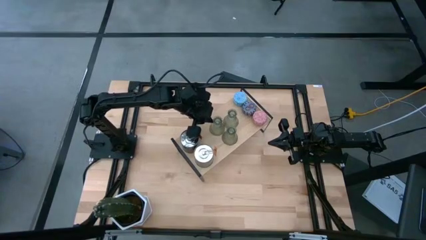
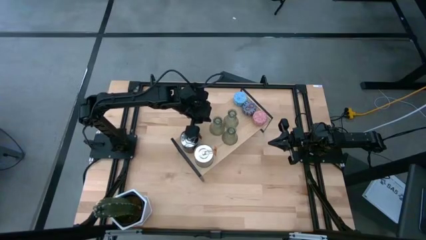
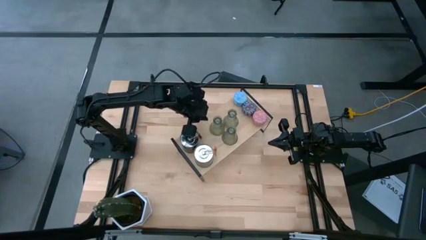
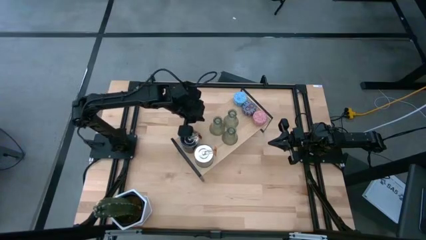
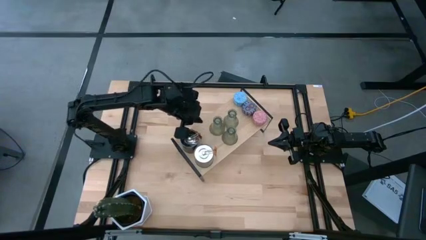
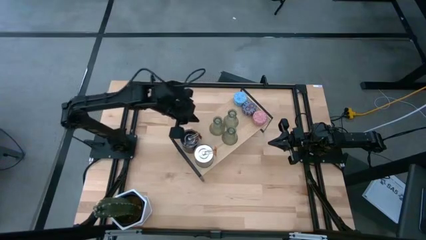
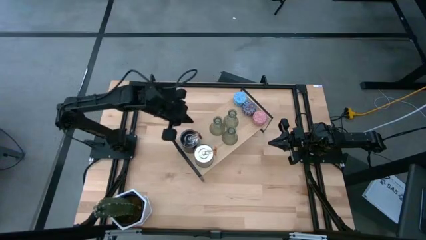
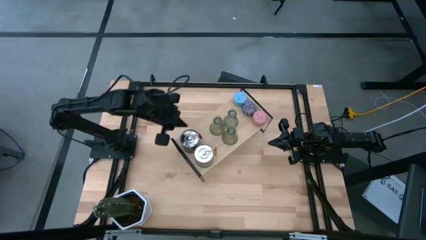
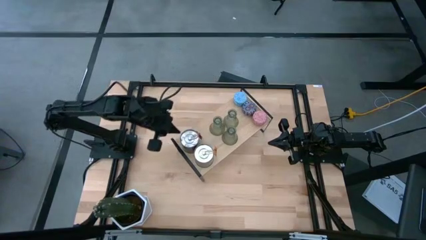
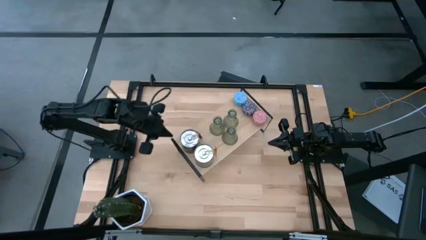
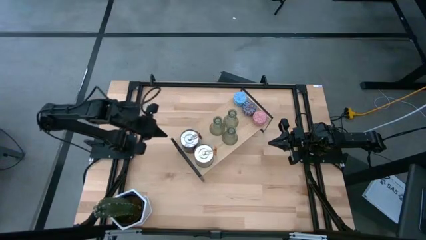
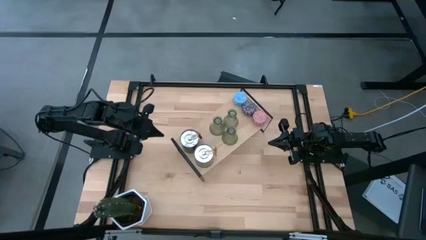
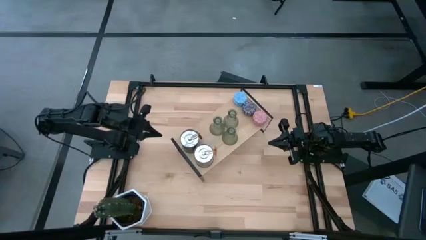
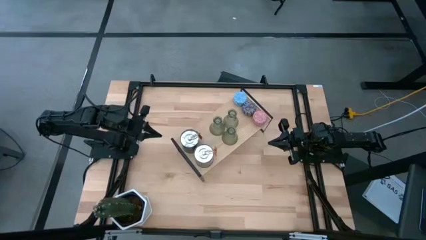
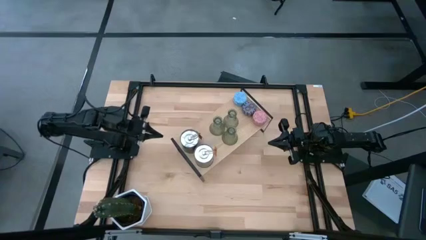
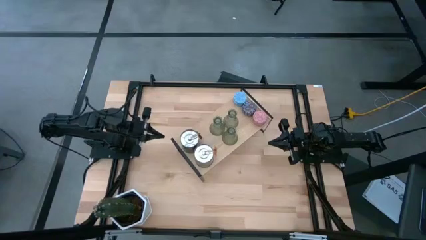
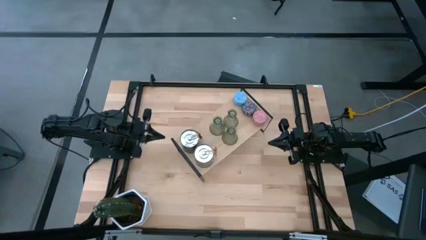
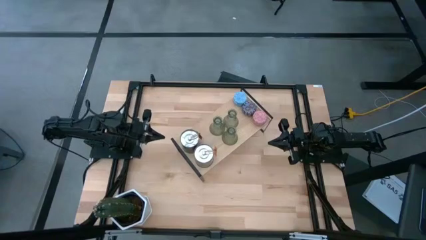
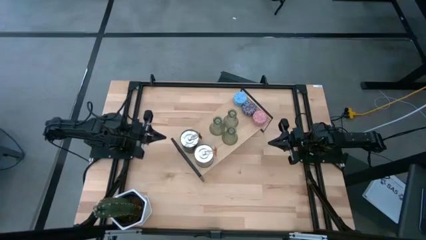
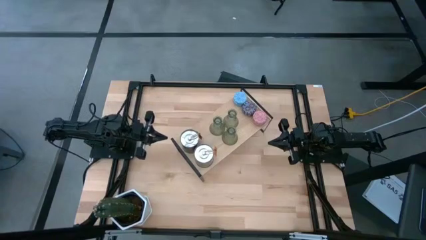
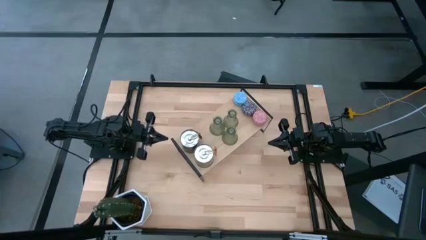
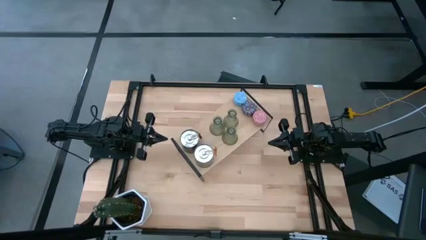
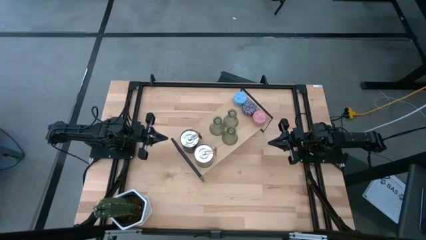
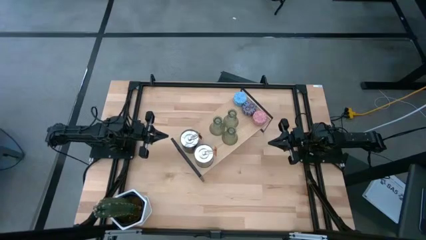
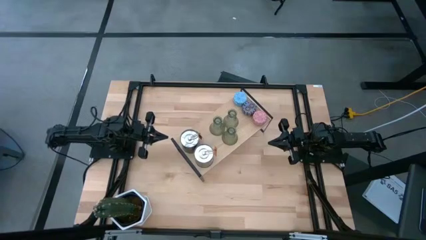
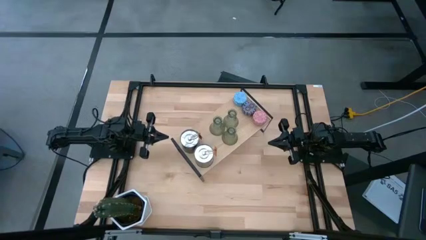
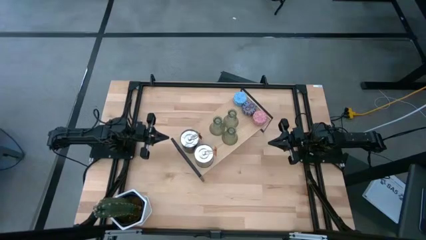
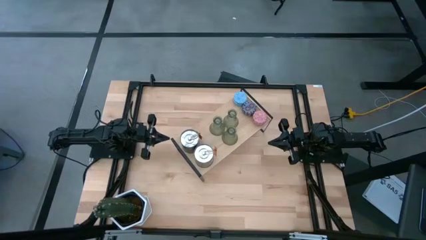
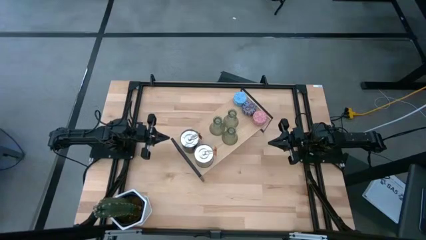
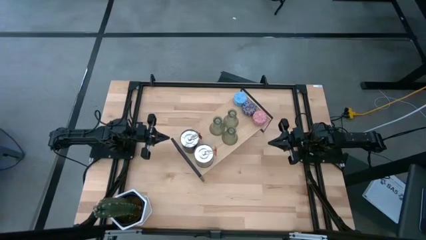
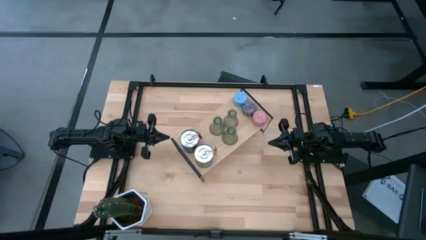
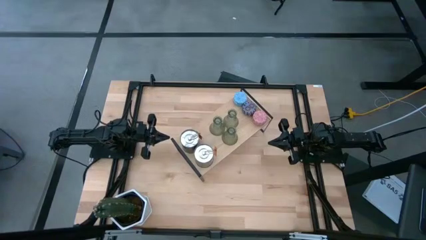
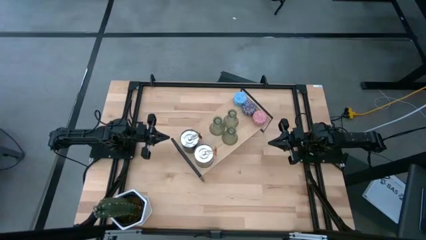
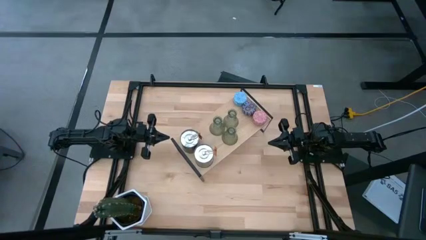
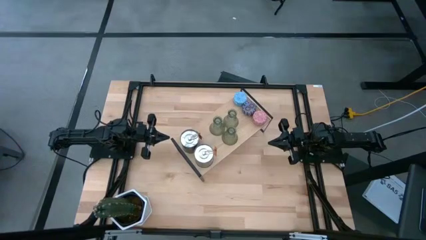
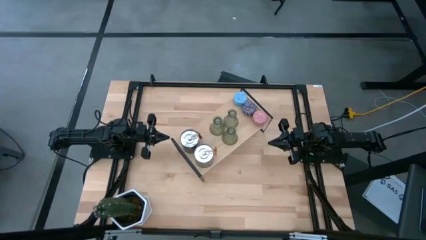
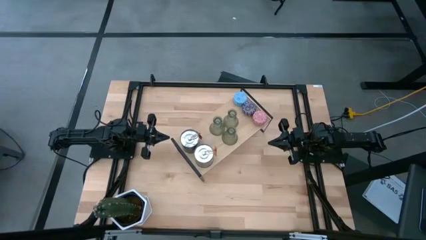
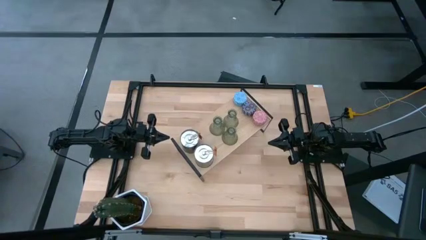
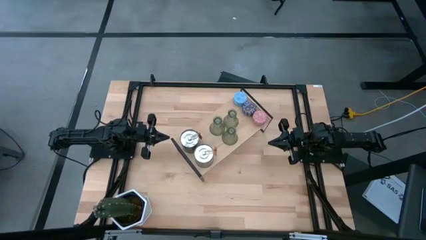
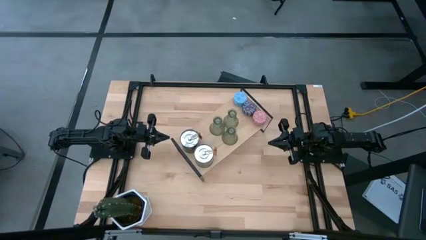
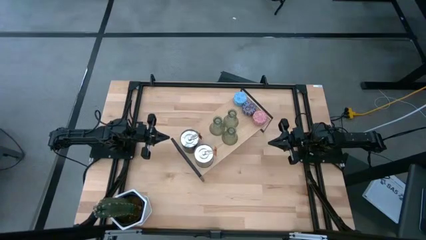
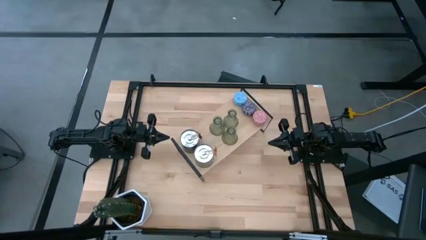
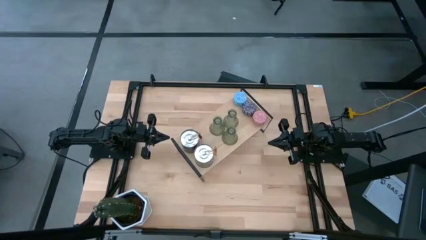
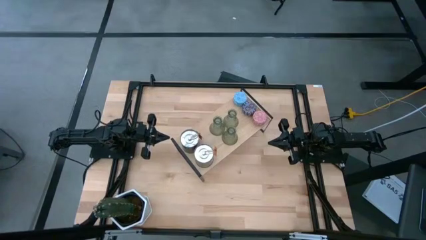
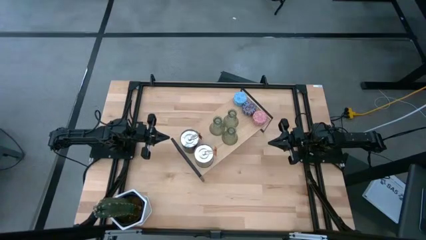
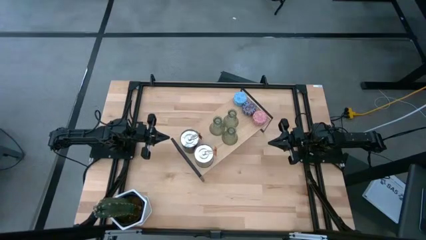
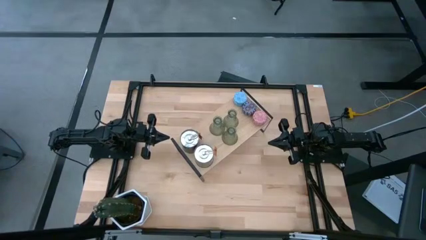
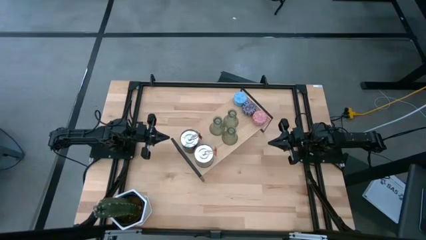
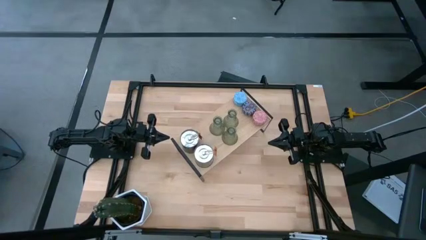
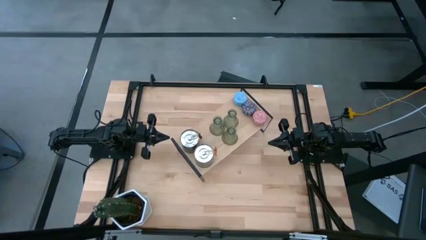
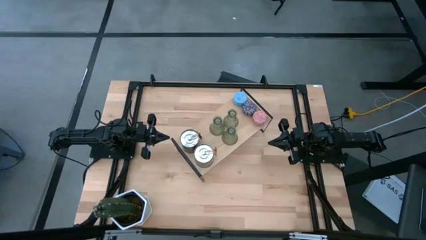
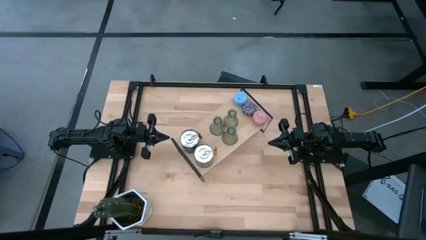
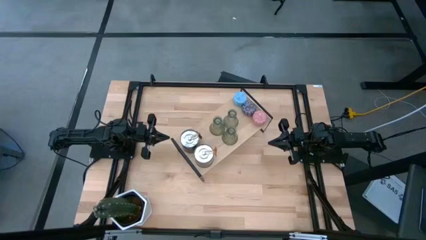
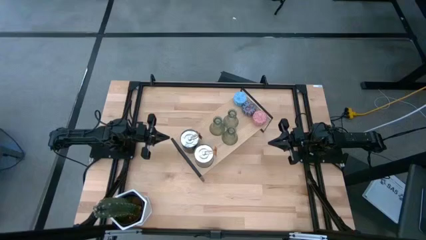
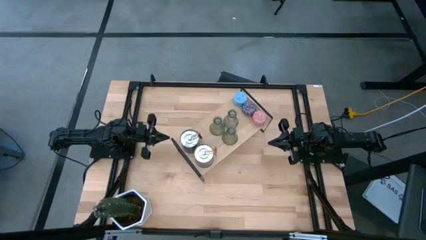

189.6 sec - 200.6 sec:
Task: Pick & Place candle stick holders
Return to Home Position

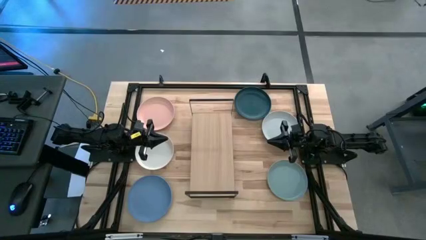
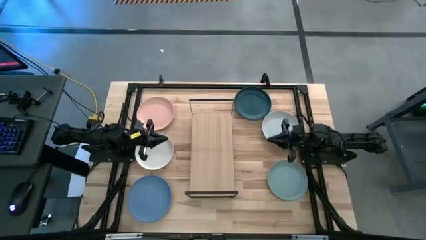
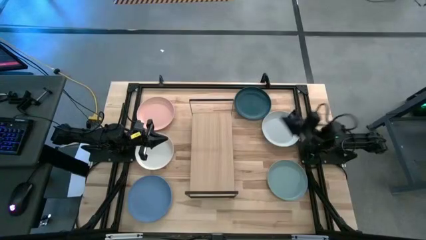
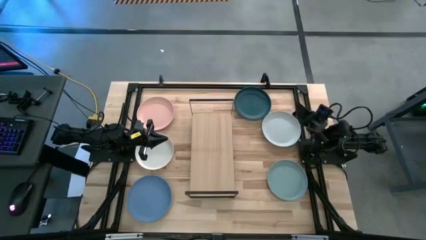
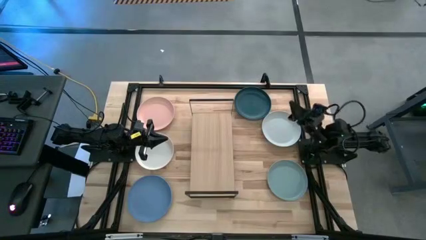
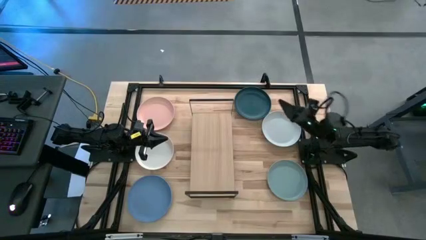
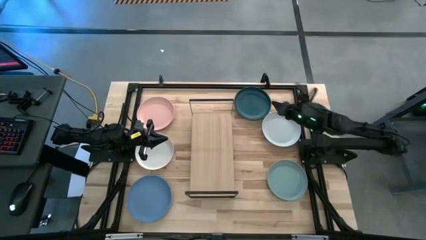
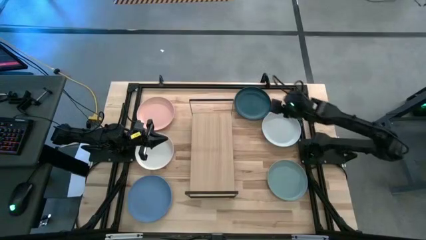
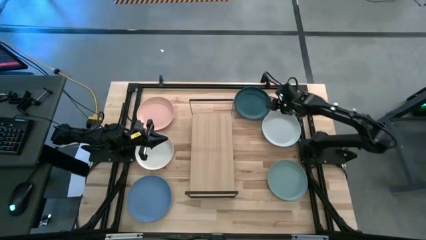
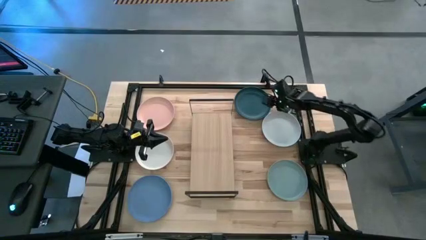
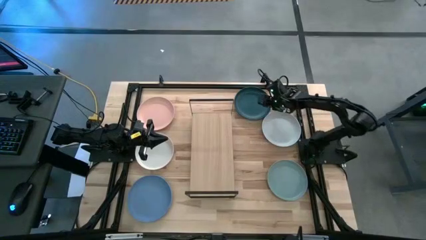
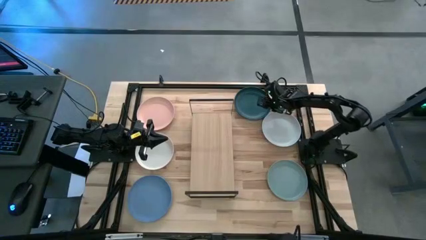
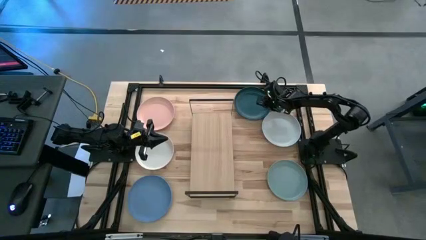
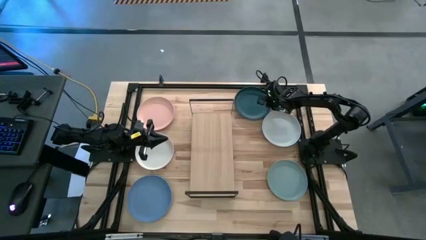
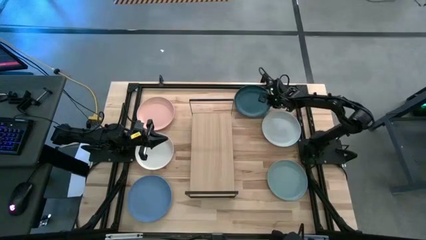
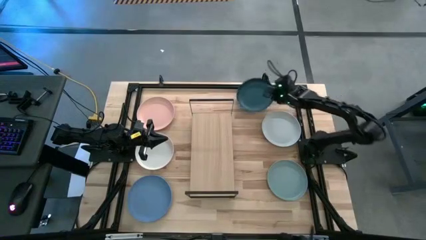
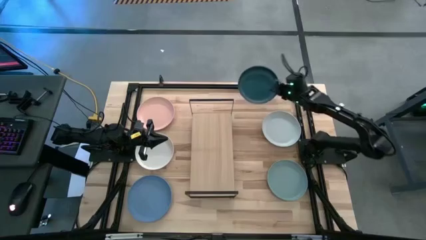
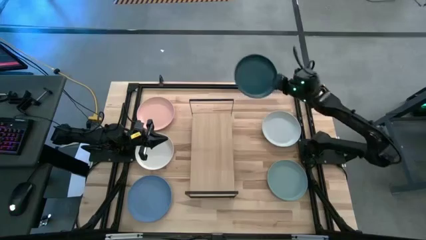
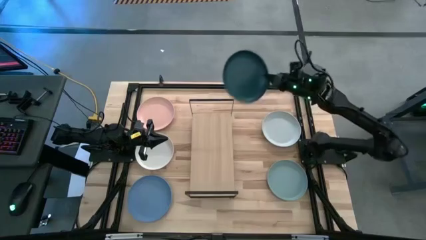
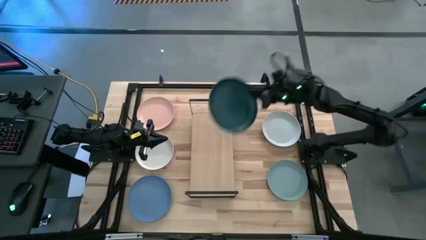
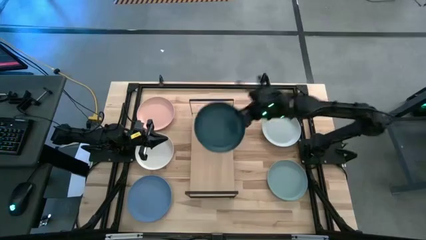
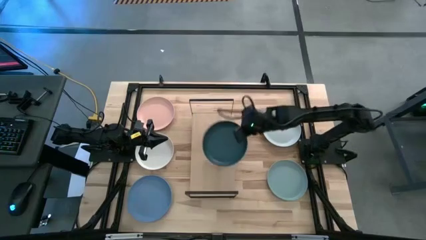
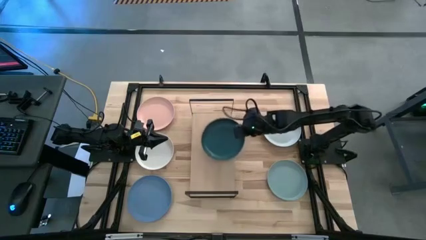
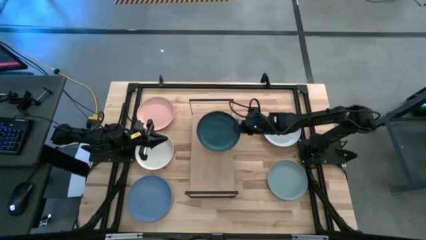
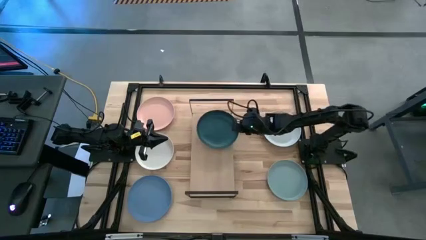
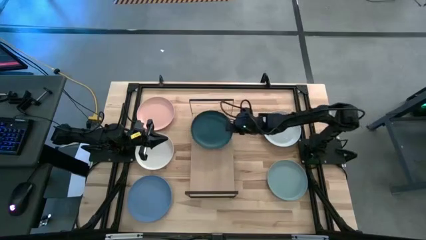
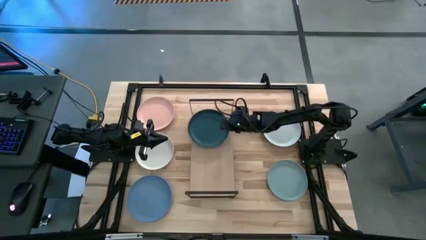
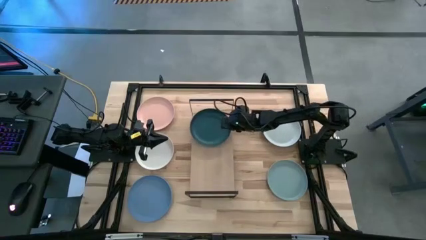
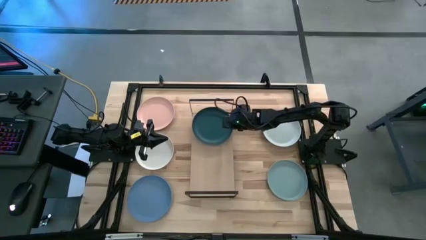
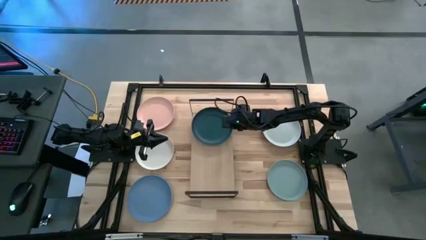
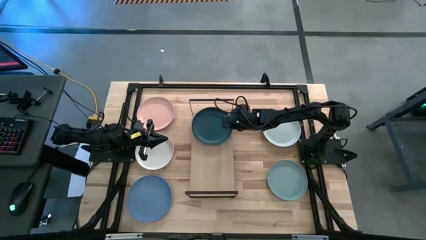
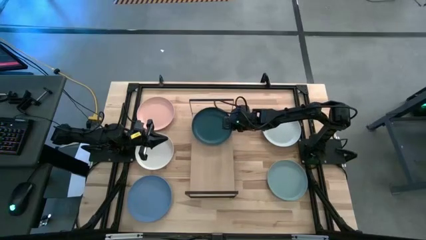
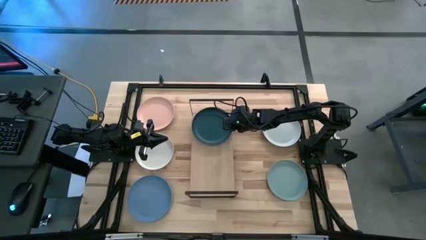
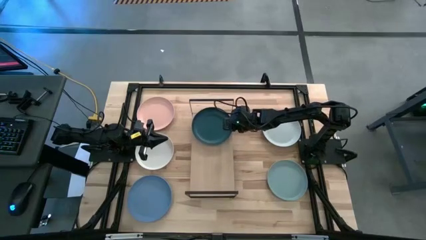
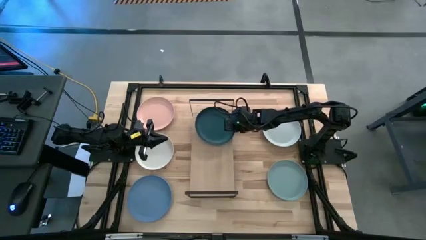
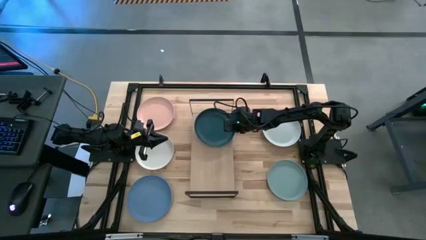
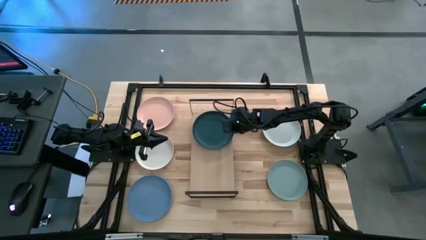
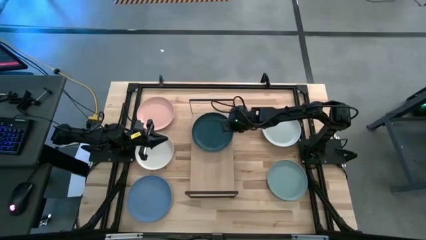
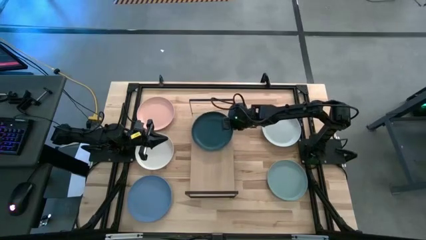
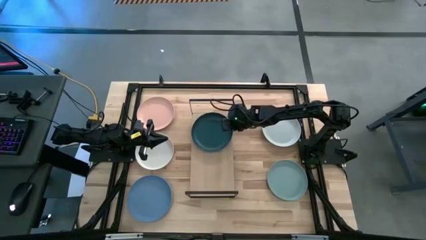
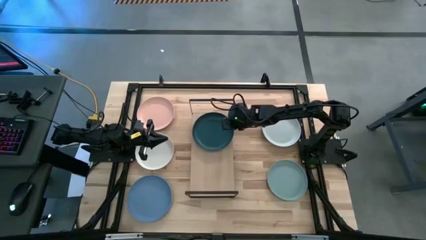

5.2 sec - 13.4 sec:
Task: Place and stack plates onto a shelf
Put the dark green plate on the shelf
